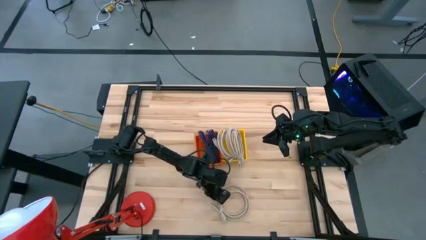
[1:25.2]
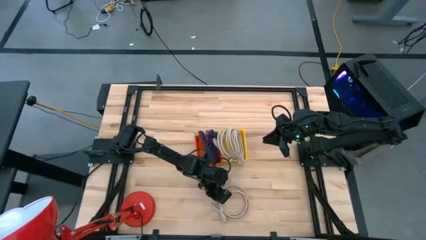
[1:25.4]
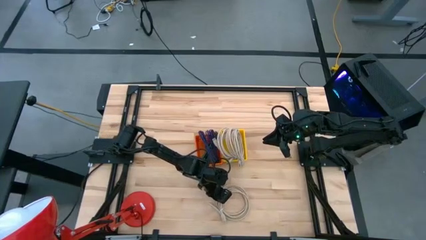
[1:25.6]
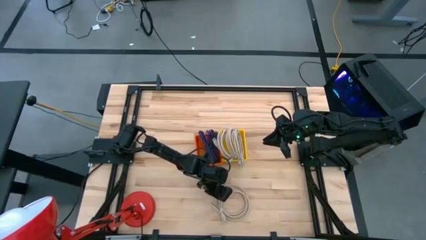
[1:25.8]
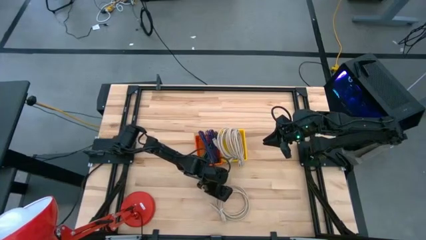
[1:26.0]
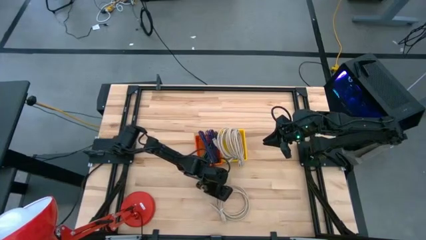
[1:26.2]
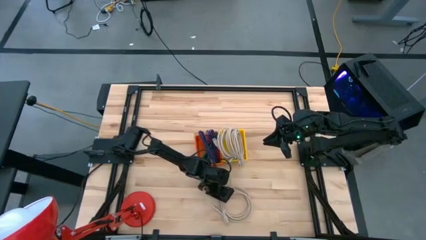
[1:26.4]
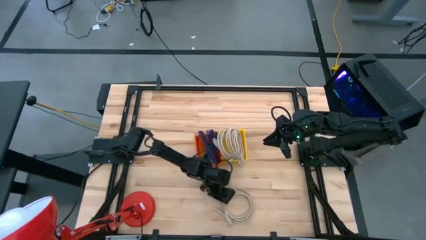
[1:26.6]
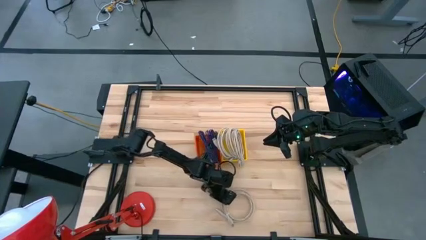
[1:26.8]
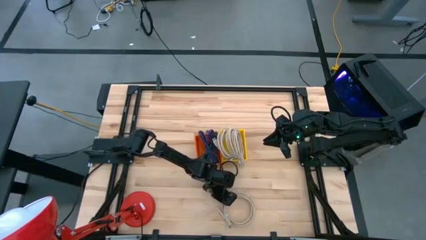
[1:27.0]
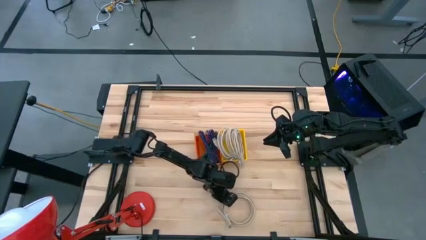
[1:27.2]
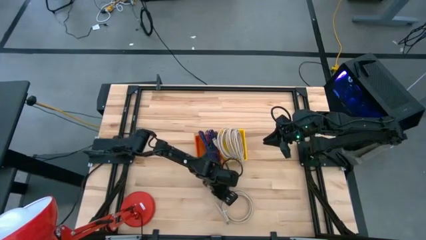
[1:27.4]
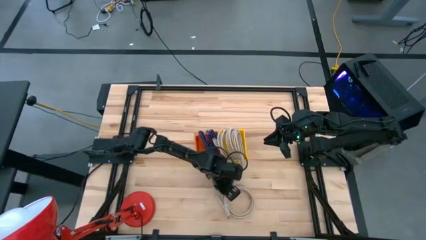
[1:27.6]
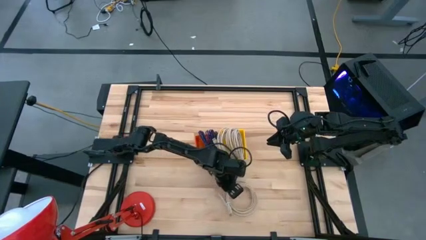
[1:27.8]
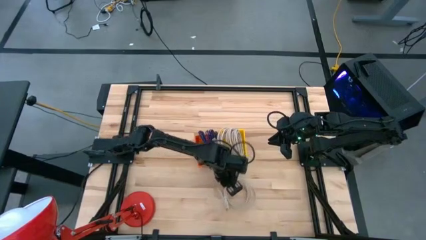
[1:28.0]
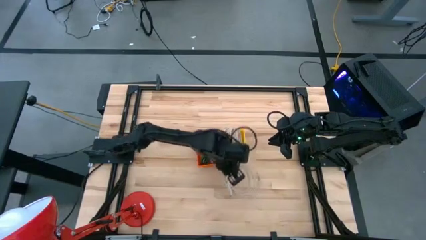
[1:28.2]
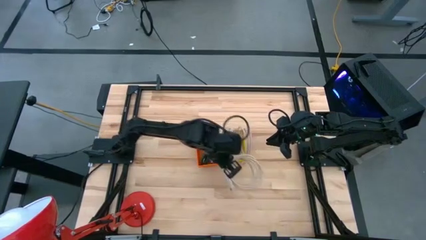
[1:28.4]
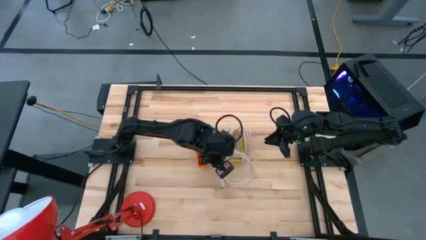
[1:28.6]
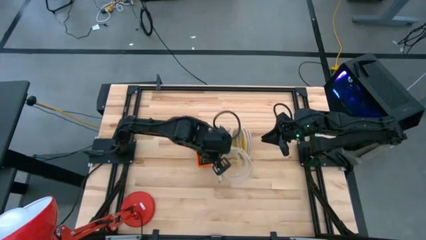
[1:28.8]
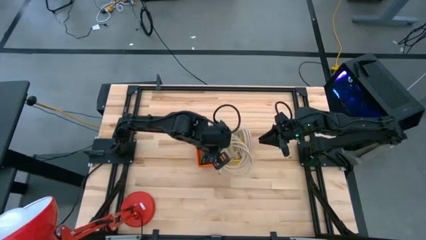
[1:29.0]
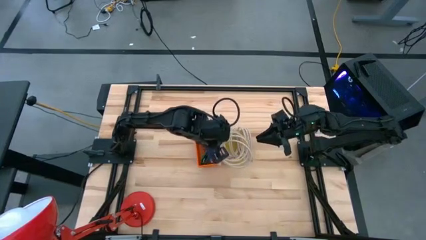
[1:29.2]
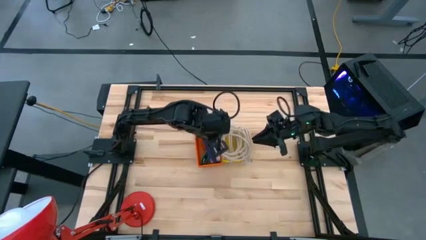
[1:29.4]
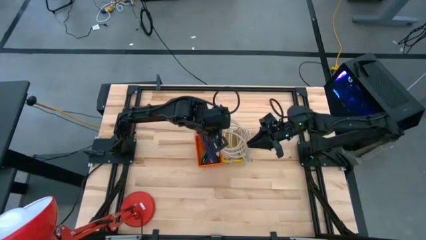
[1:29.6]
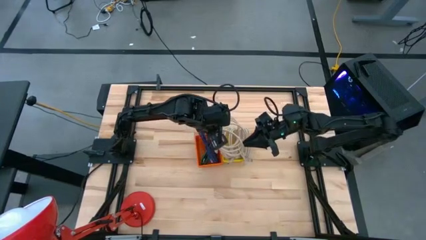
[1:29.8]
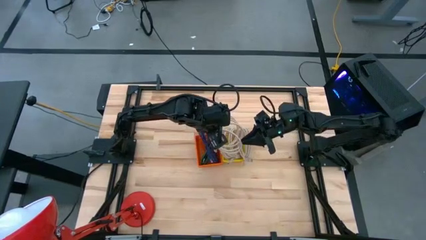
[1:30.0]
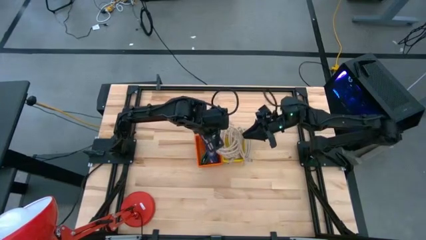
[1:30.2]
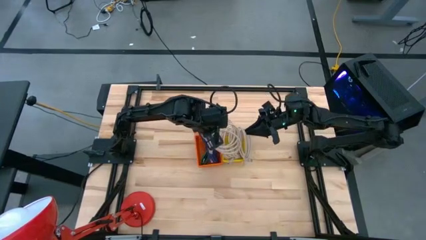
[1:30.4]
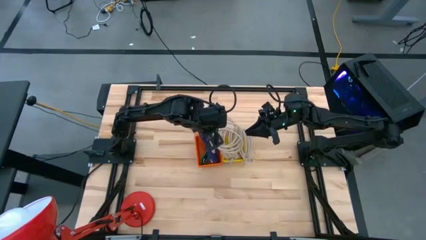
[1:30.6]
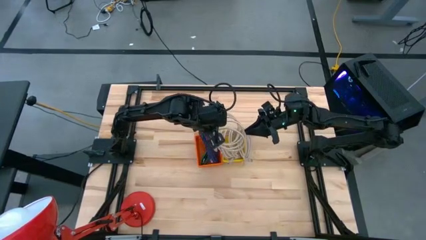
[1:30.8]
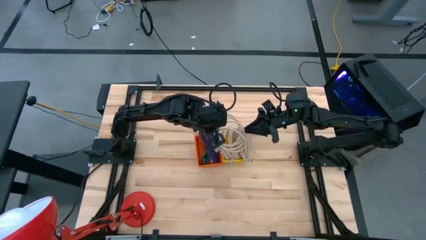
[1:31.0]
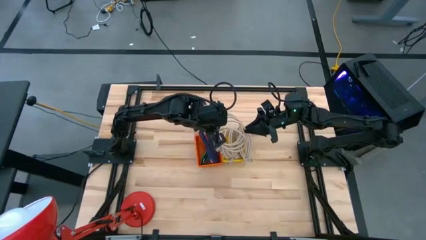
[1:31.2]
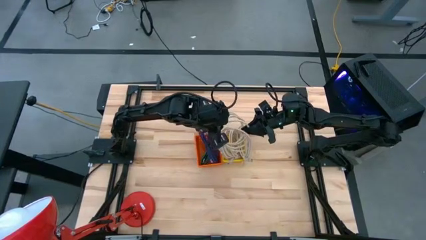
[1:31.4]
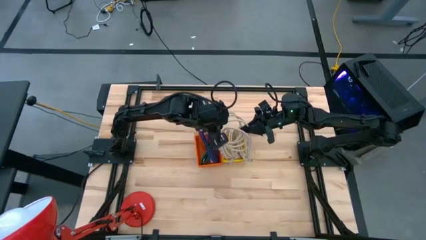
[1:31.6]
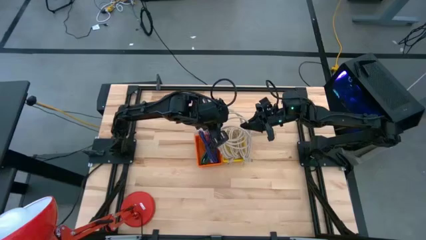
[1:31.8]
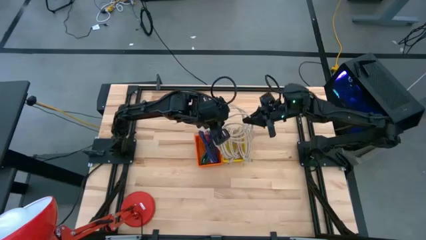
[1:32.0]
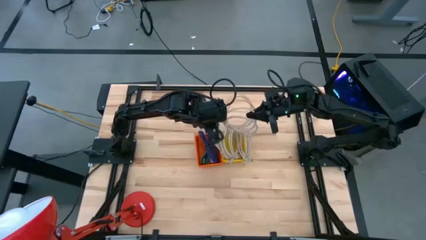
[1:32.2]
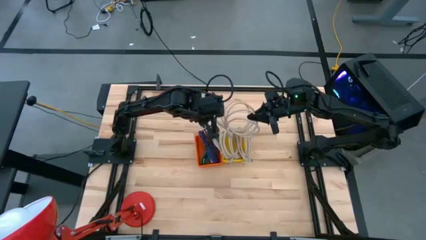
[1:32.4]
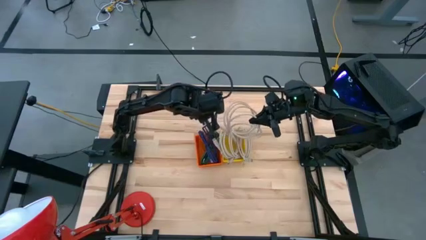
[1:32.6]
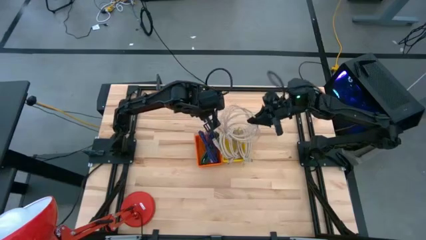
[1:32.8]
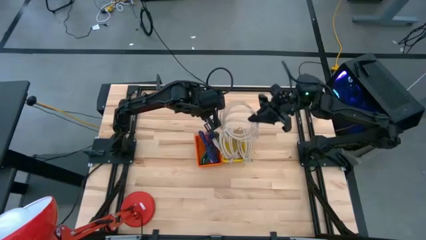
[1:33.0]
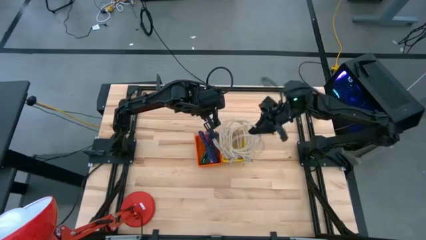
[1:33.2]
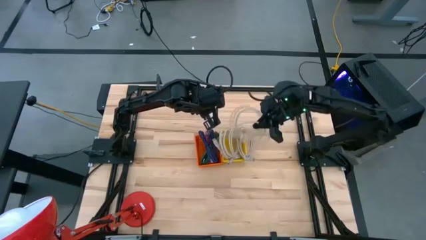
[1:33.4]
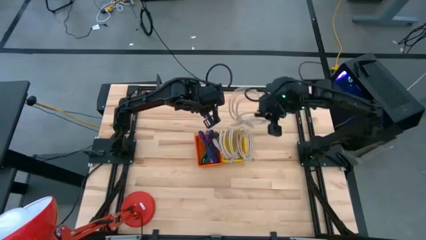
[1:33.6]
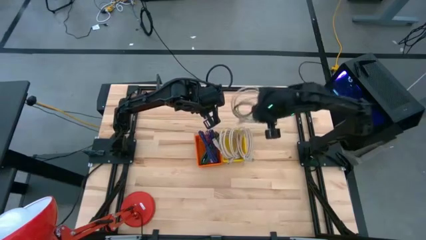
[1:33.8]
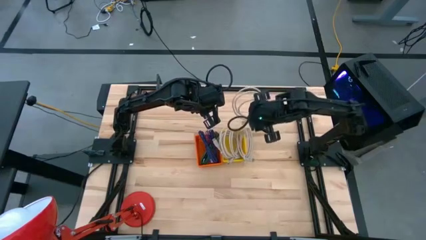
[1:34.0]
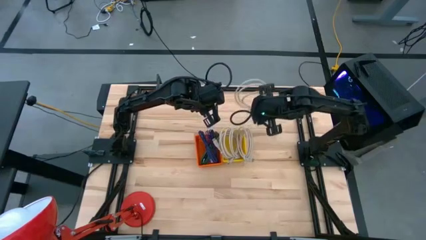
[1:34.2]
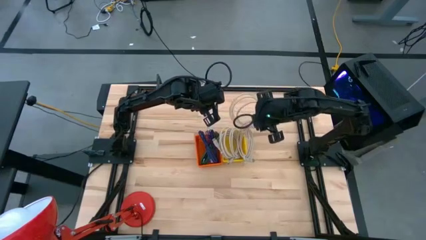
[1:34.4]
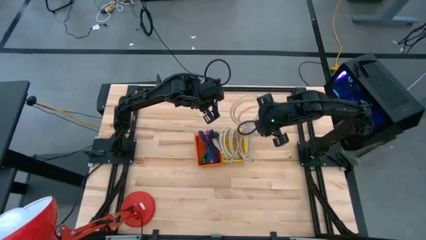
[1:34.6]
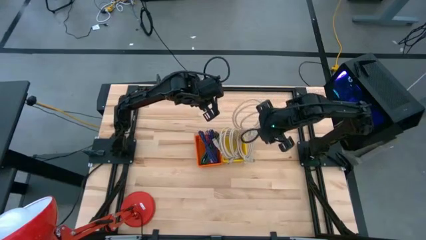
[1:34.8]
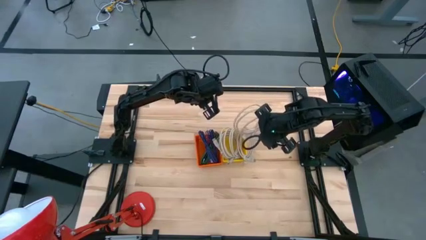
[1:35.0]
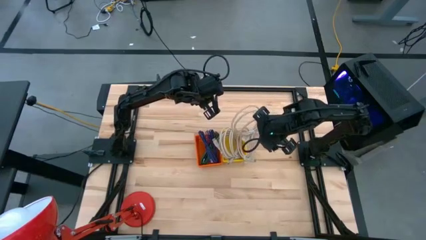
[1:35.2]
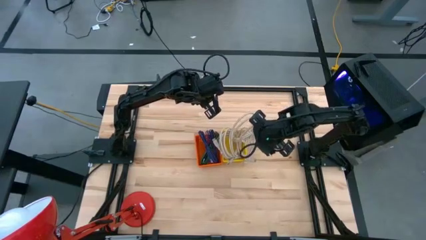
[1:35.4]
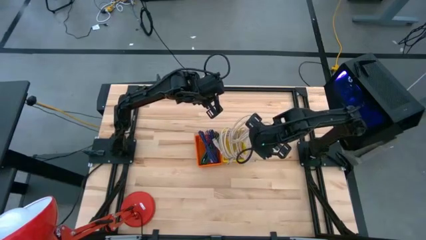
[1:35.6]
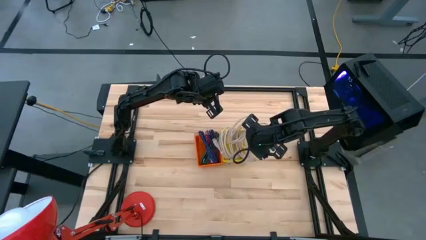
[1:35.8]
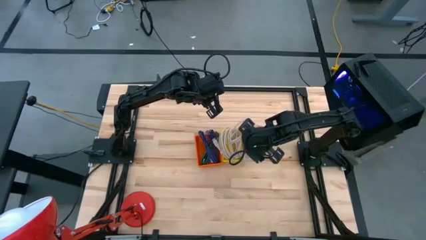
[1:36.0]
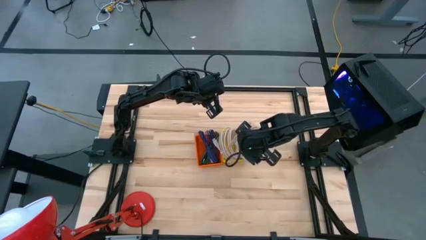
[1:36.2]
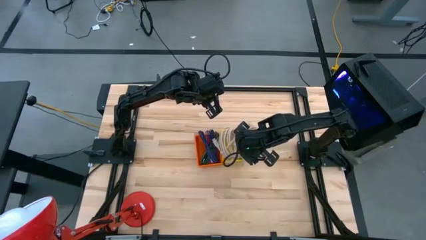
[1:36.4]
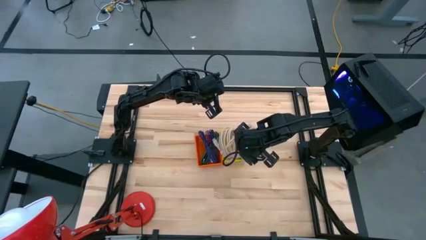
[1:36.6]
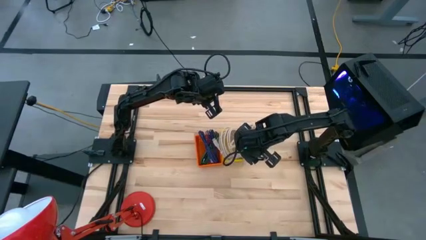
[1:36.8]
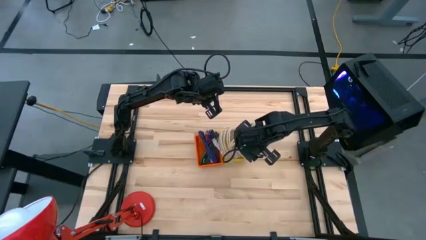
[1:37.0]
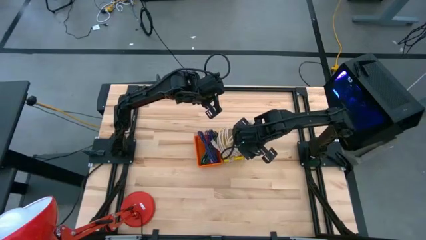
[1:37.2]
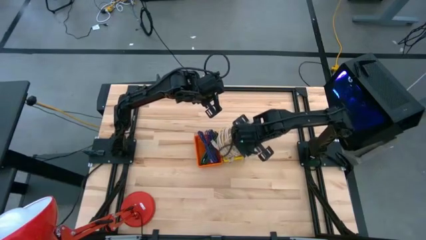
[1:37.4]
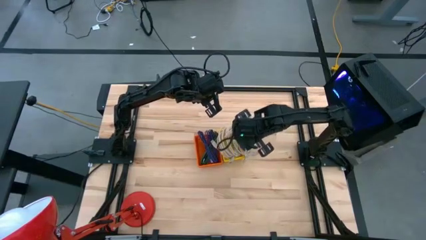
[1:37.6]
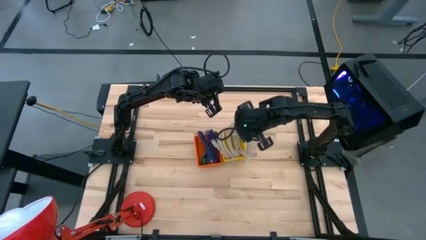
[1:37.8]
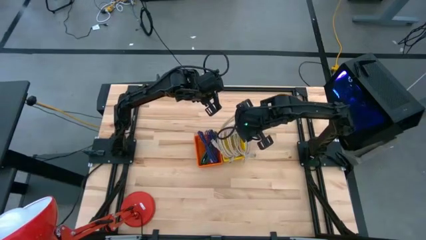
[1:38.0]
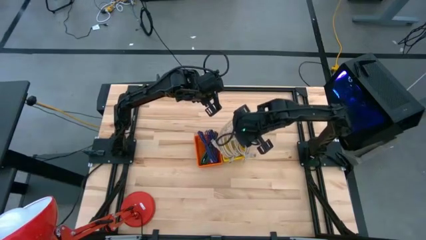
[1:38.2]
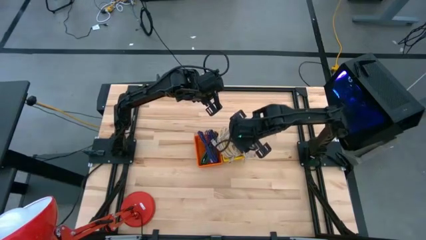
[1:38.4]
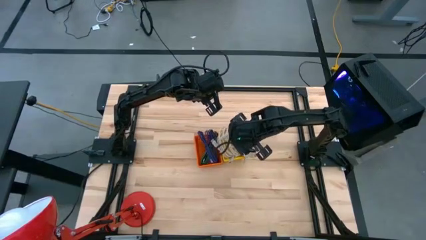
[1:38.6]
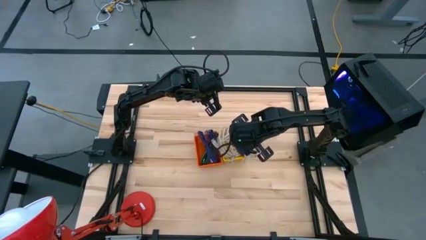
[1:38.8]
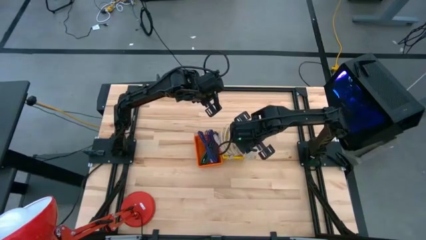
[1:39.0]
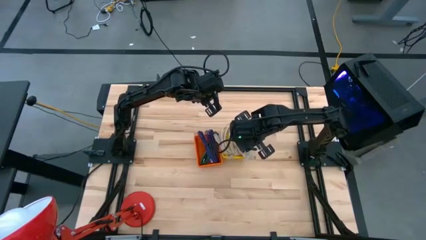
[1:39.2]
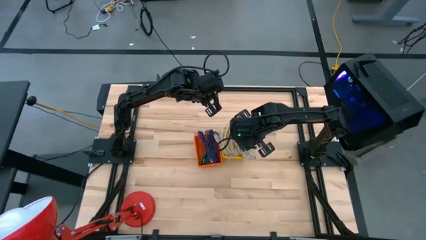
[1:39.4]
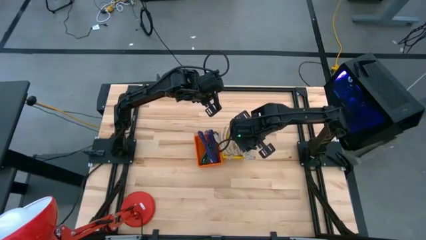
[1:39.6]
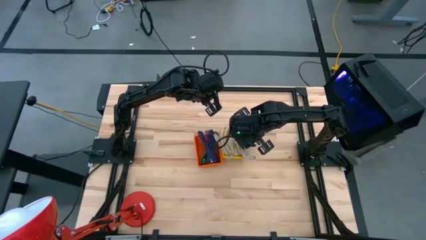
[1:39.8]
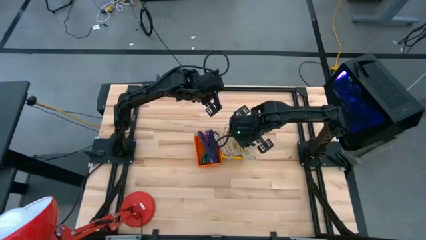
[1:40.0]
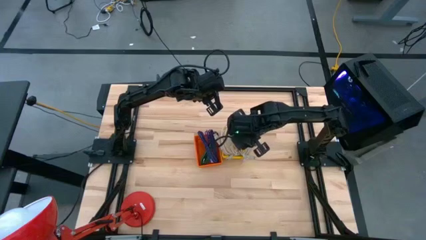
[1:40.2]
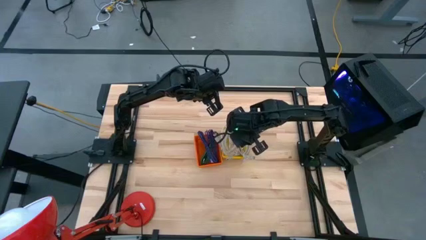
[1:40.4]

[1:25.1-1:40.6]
Task: Pick & Place USB Port
Put the brown HDMI cable into the yellow basket

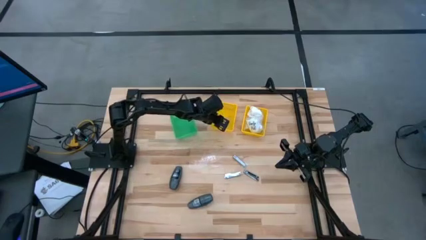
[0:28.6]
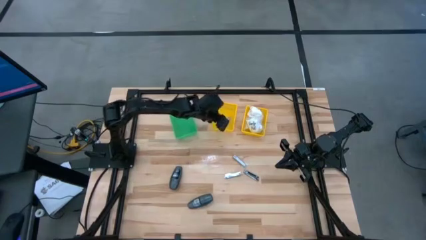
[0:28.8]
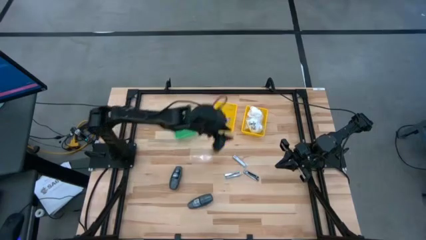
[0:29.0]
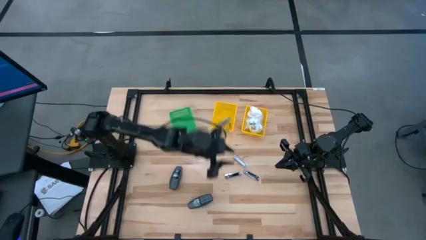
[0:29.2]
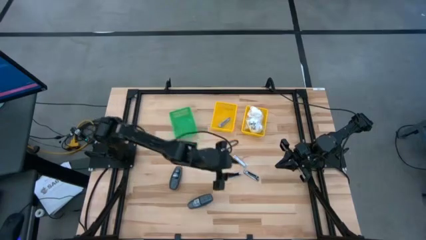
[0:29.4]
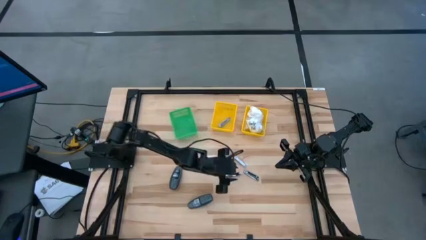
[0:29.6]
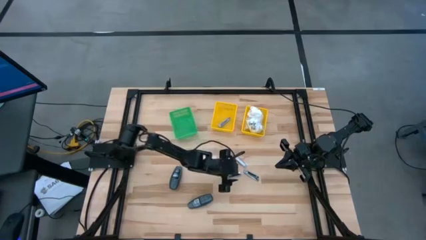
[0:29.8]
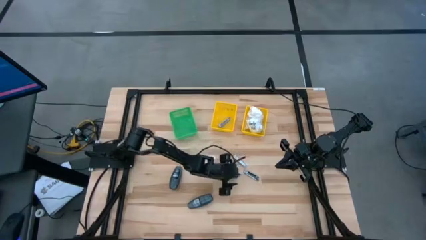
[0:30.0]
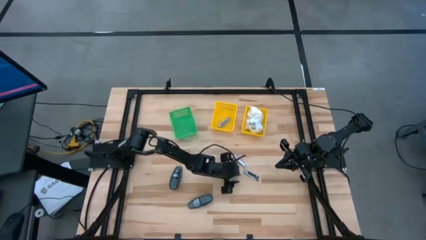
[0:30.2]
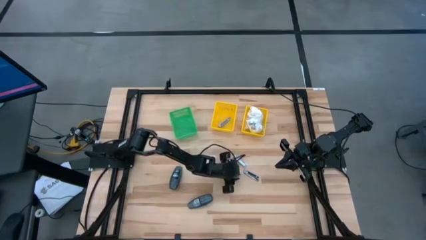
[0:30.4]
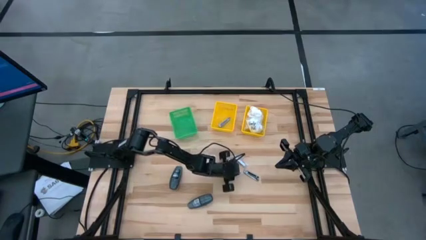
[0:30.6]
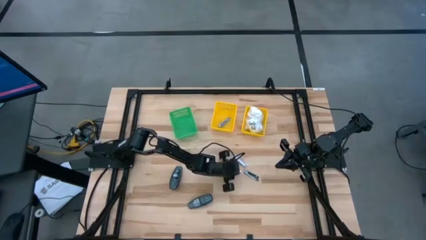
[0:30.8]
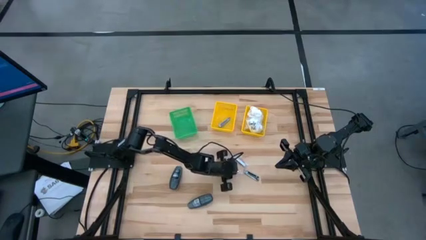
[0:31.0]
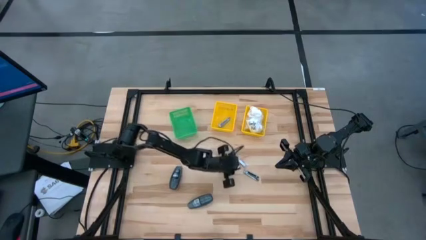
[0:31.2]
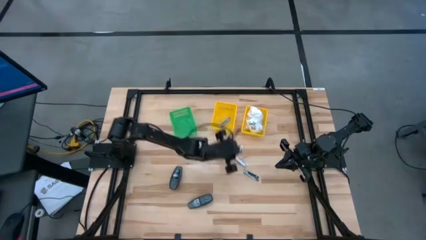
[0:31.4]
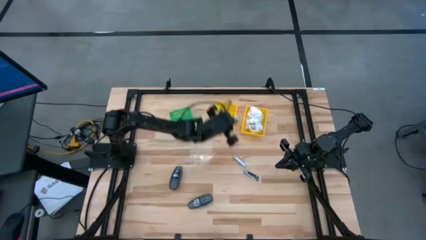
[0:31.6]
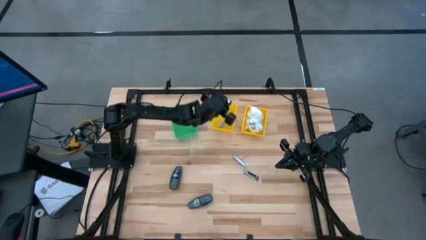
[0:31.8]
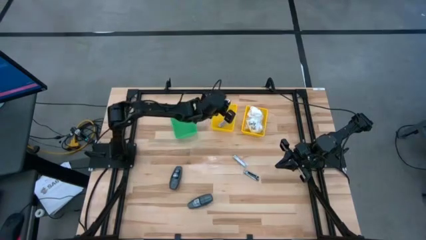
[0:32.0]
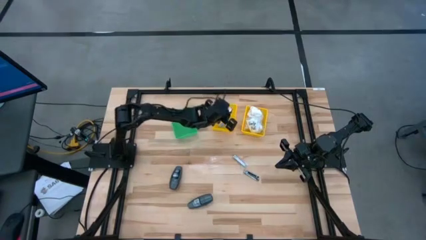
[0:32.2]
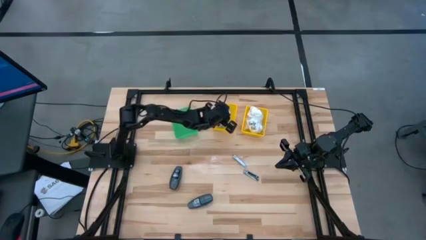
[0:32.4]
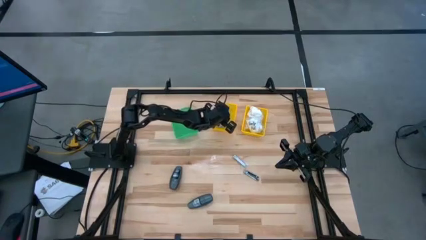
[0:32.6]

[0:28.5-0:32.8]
Task: Pick & Place Travel size toiletries
Put the silver nail cutter into the left yellow bin
